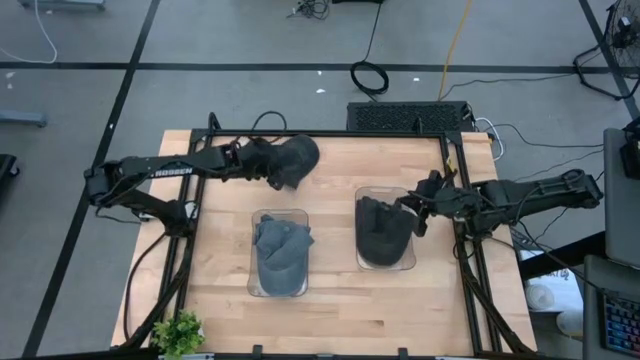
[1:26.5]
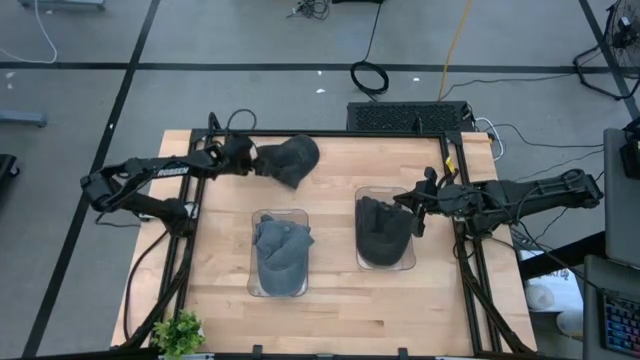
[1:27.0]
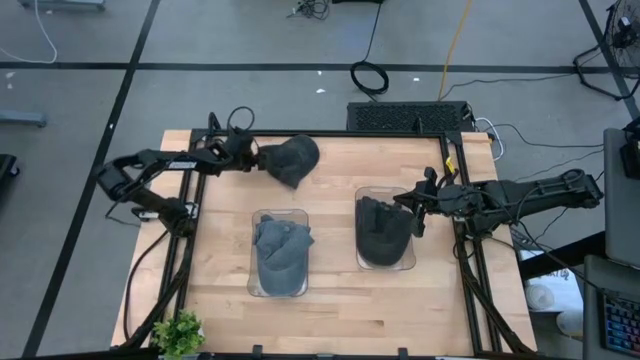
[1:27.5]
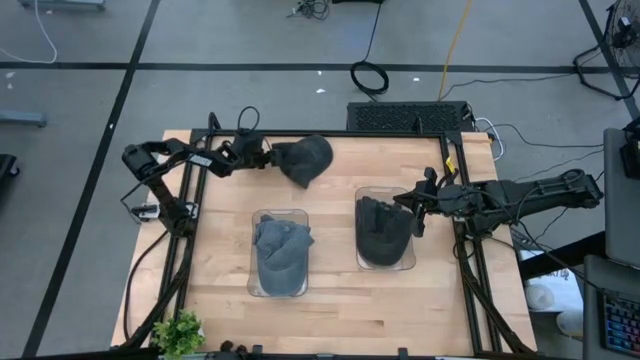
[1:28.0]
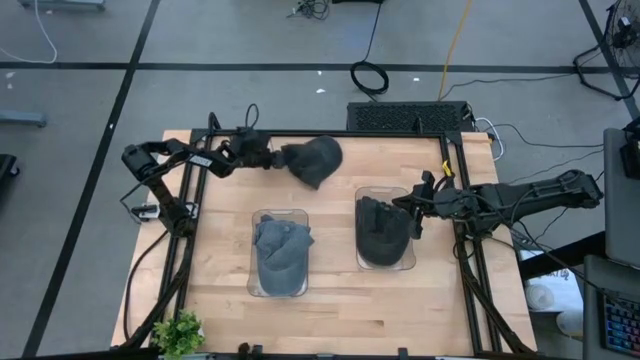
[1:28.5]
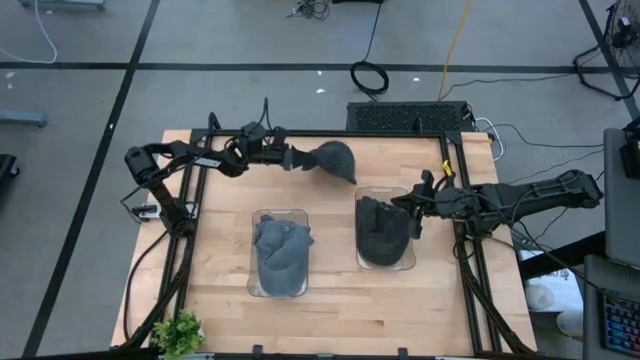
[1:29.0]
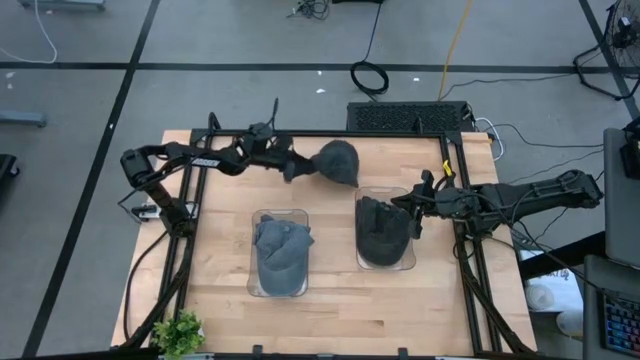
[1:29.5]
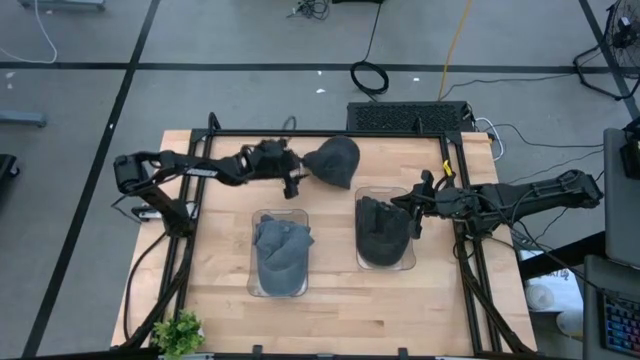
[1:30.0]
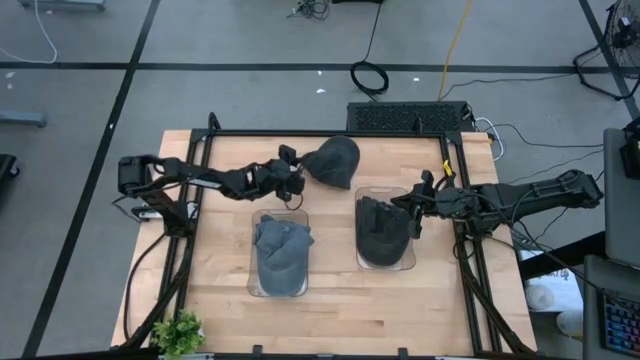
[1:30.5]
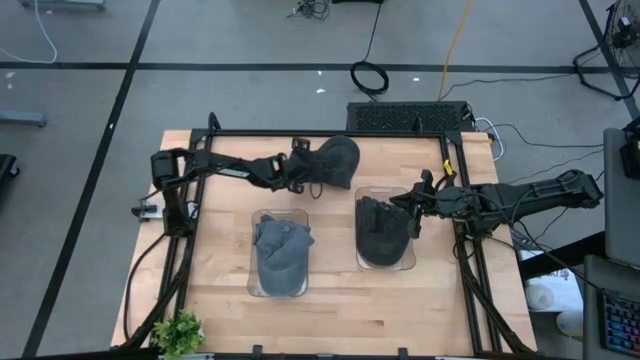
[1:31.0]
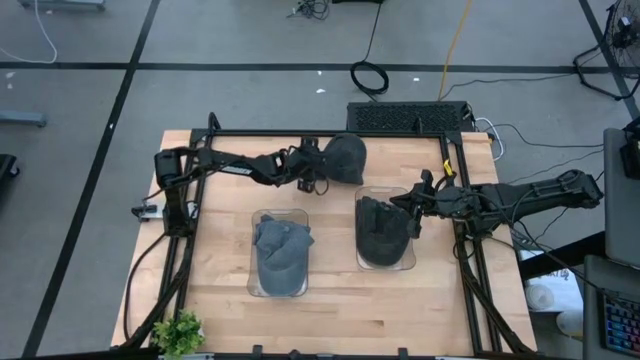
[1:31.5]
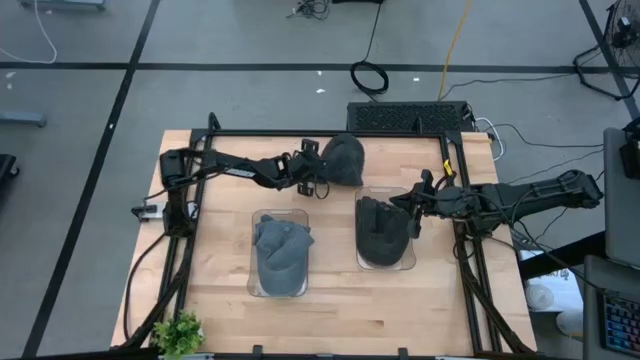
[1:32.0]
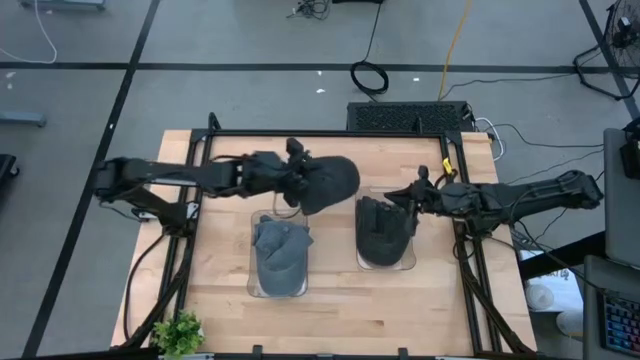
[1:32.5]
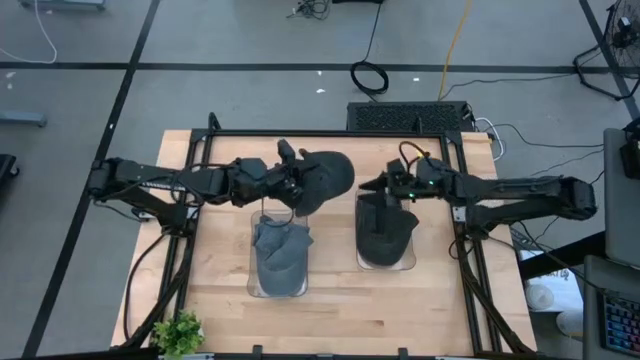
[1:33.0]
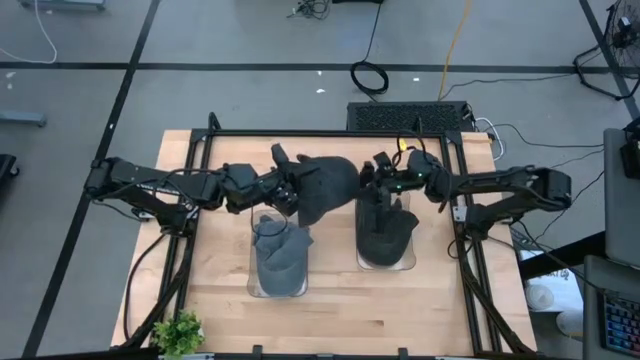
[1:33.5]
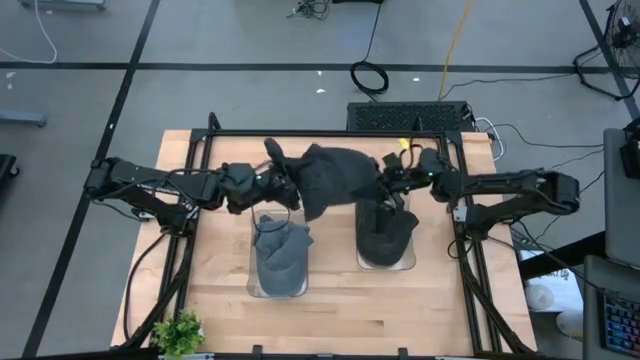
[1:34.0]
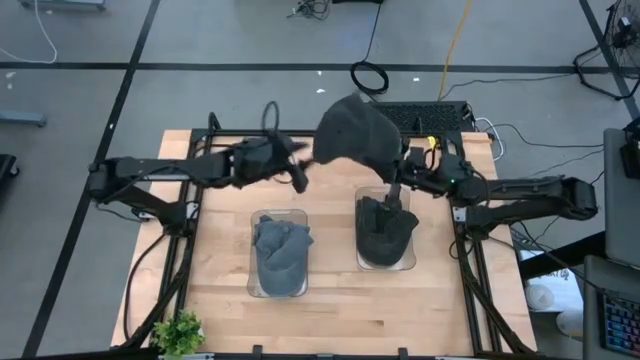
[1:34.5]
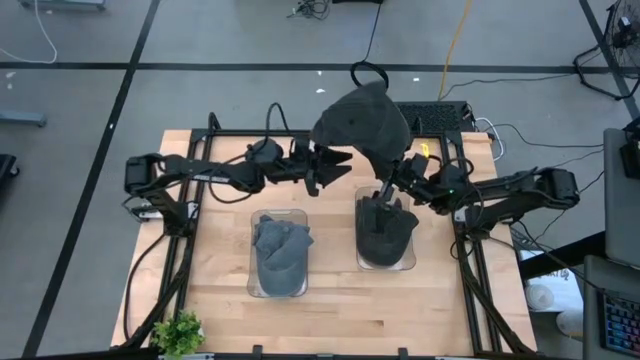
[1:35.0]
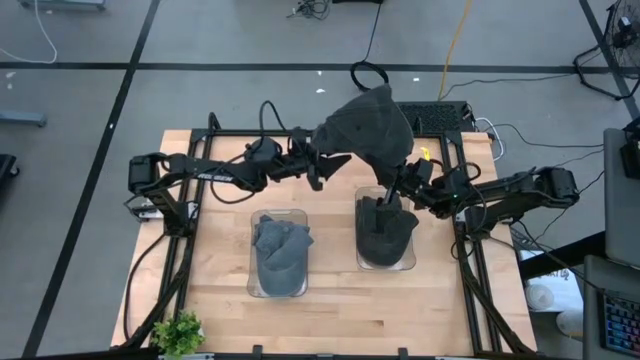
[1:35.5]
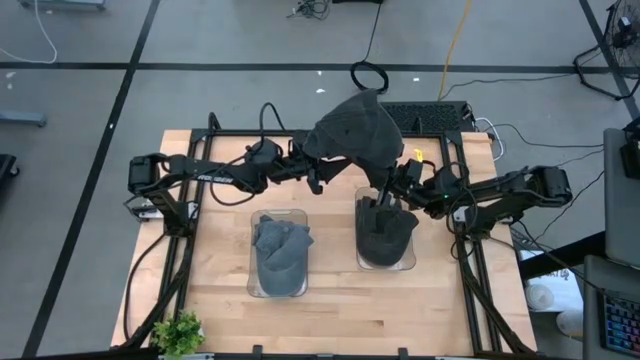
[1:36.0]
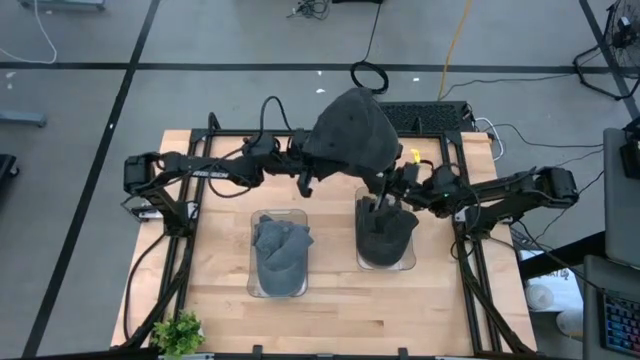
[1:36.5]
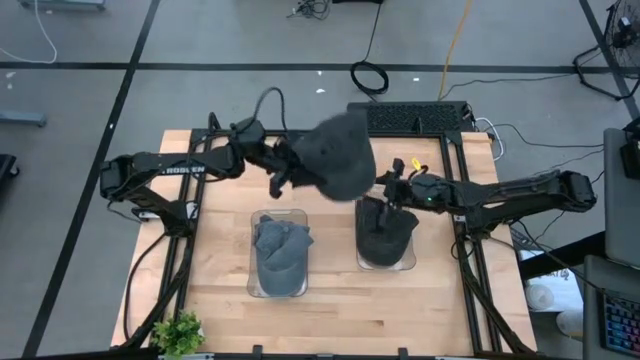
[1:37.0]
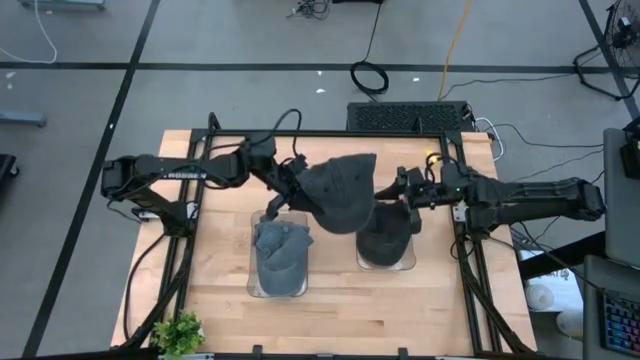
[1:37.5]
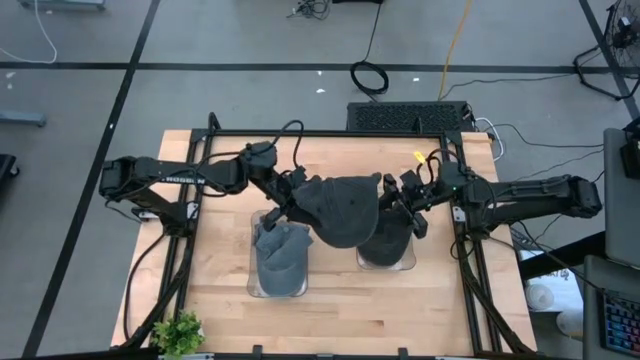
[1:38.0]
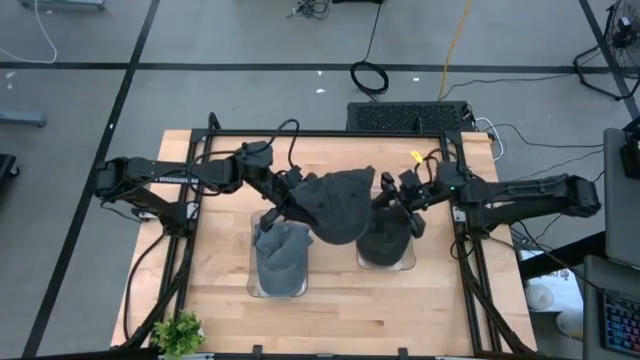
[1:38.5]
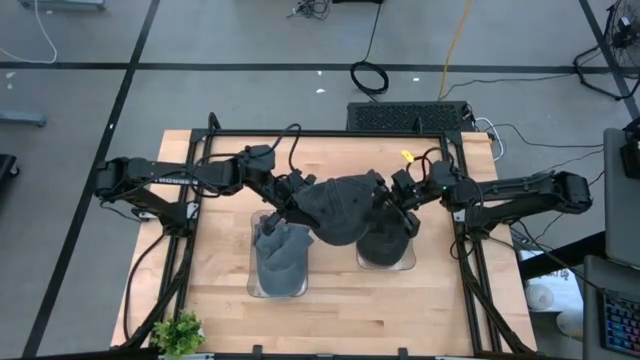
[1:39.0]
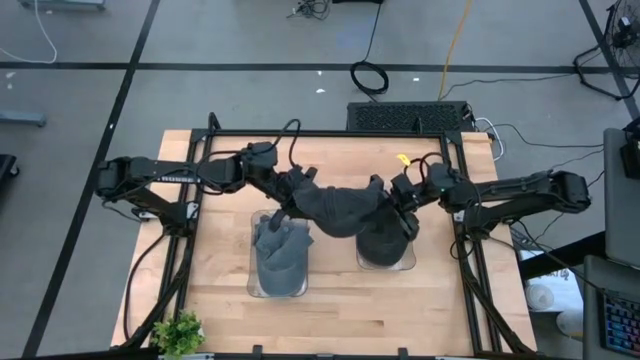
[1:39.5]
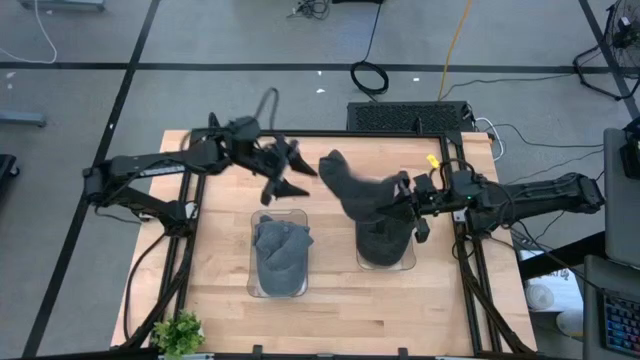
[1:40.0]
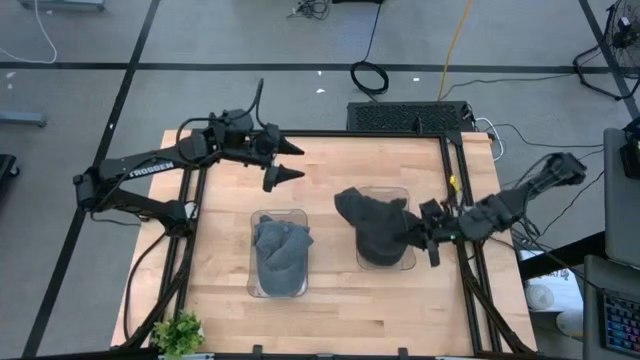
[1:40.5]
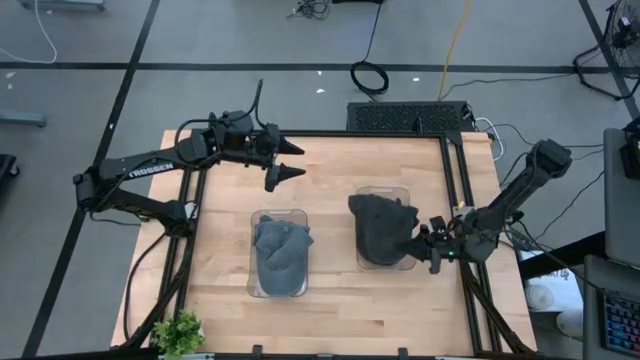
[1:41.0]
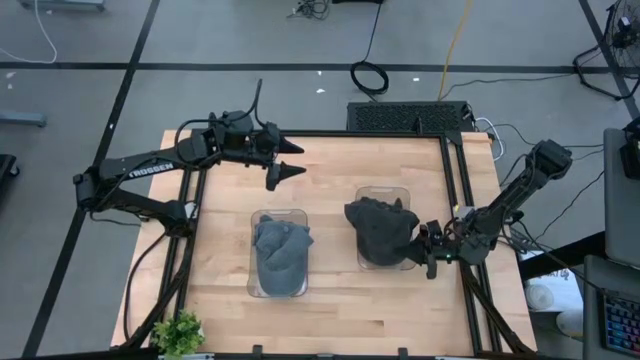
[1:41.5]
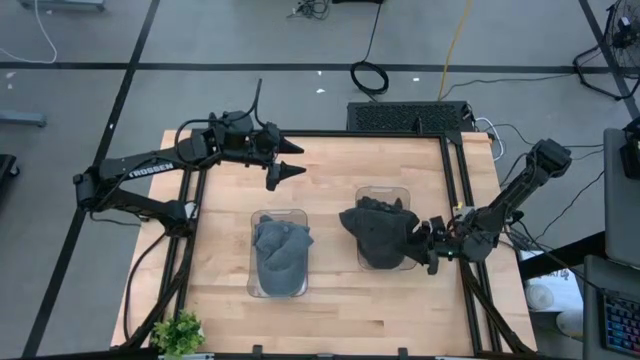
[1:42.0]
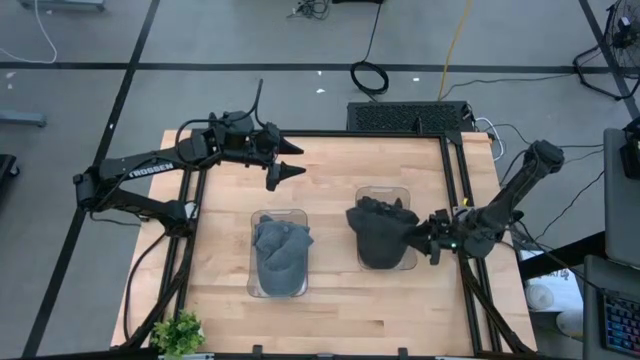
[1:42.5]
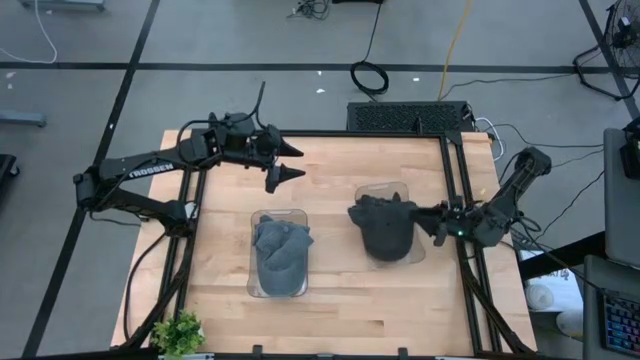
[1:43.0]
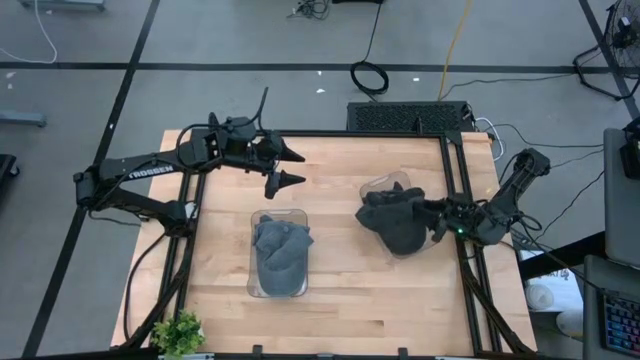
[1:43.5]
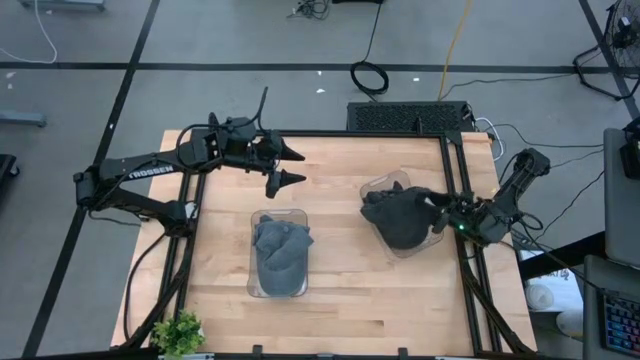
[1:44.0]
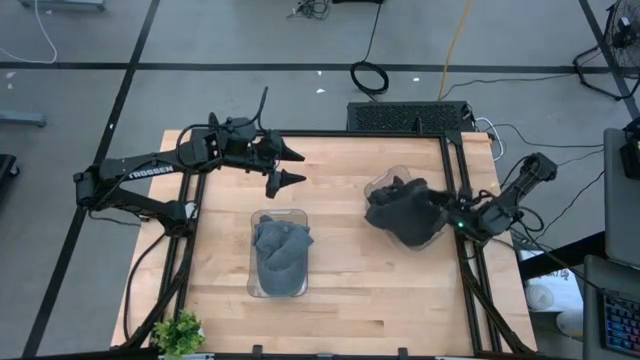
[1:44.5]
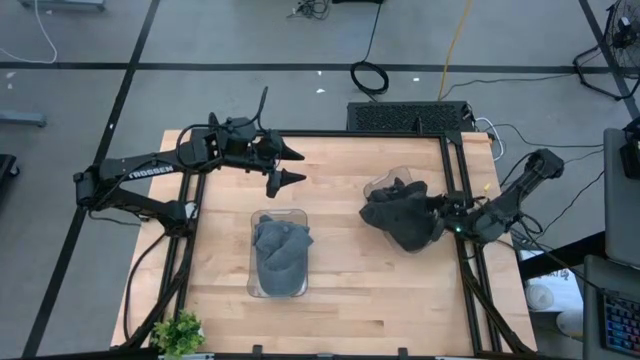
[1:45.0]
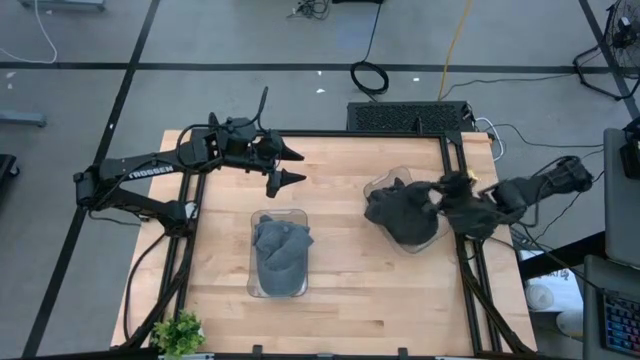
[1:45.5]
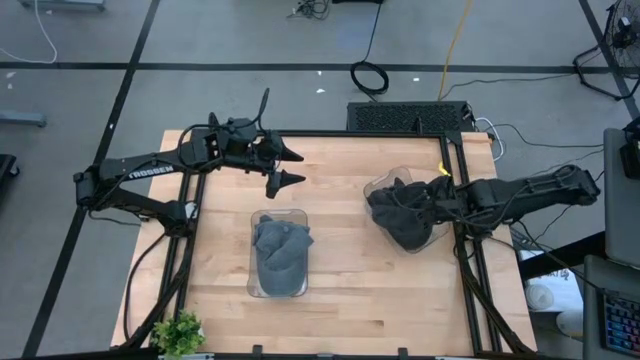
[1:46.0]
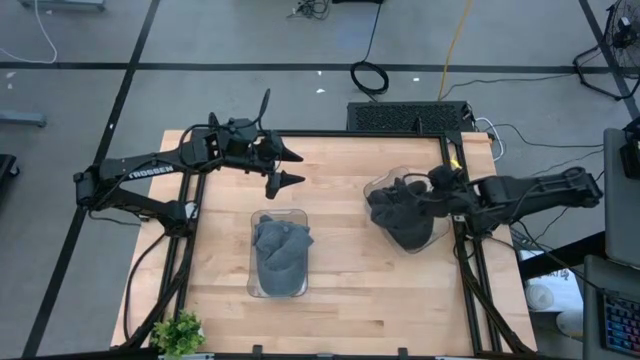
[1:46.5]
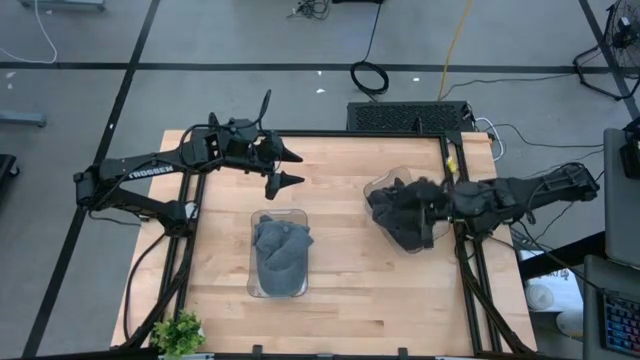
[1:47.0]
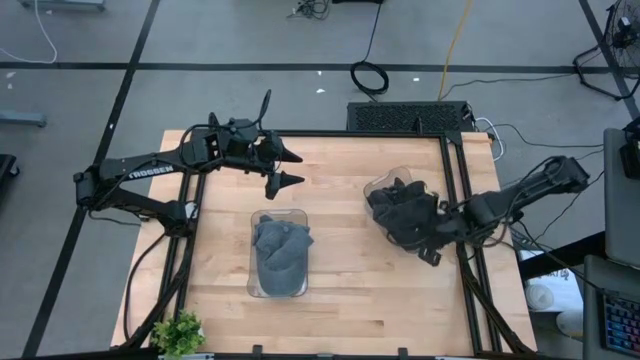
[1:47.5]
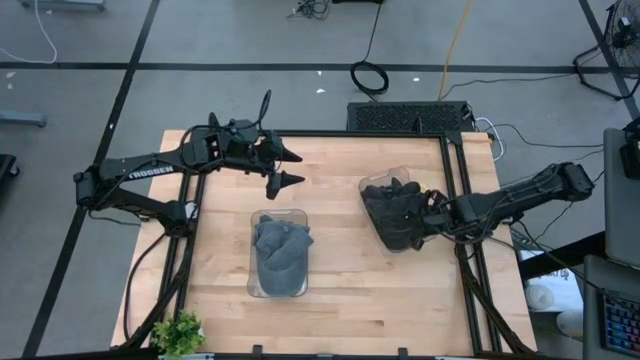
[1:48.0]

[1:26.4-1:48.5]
Task: Pick & Place hat
Put the black cap into the right transparent bin
